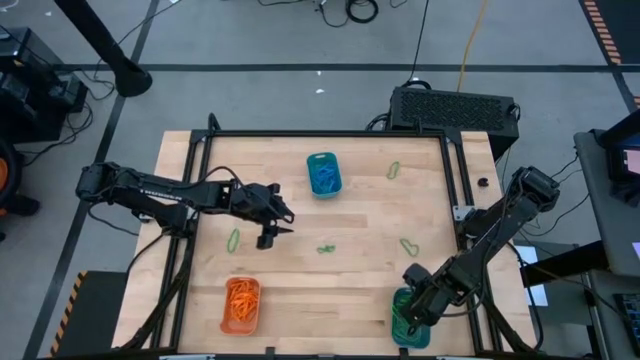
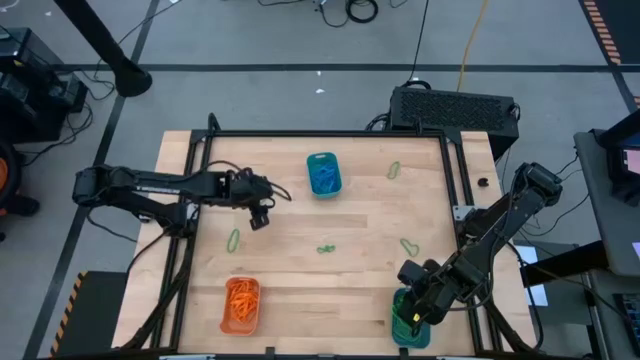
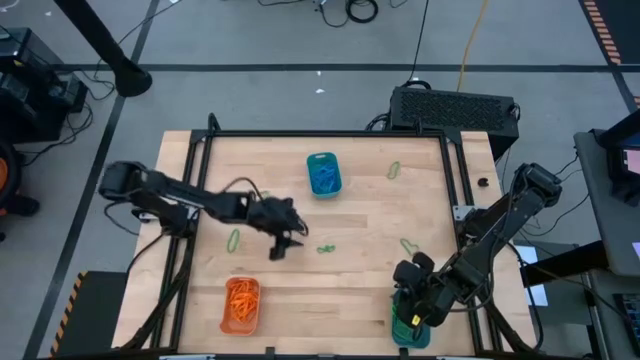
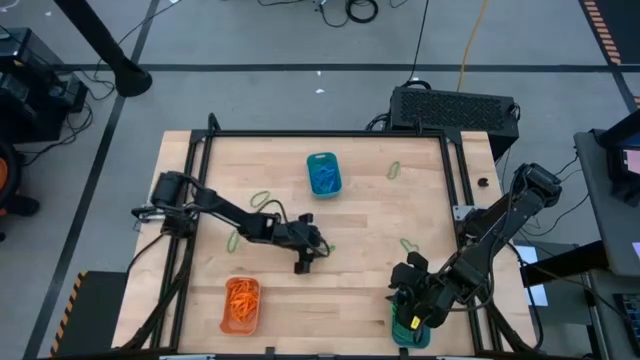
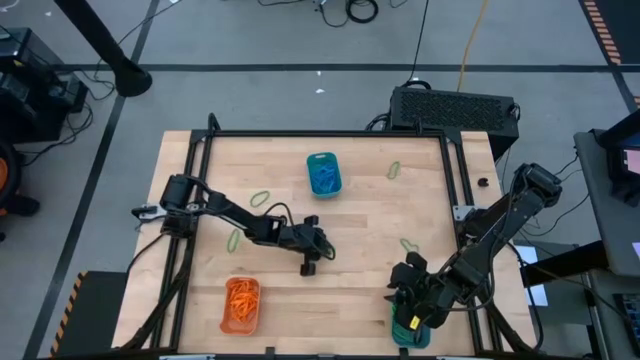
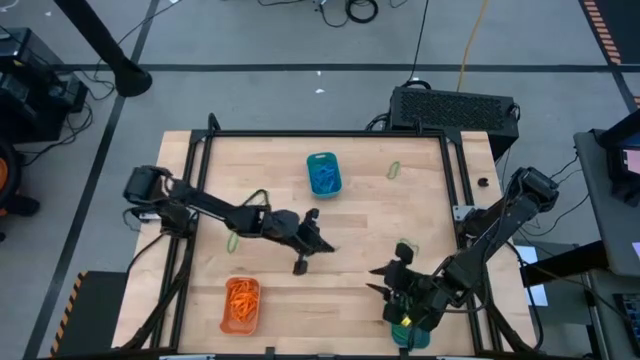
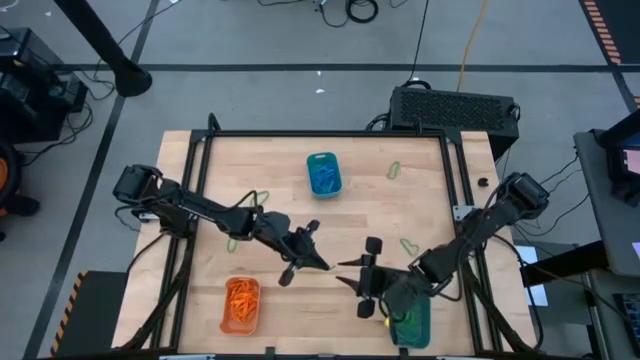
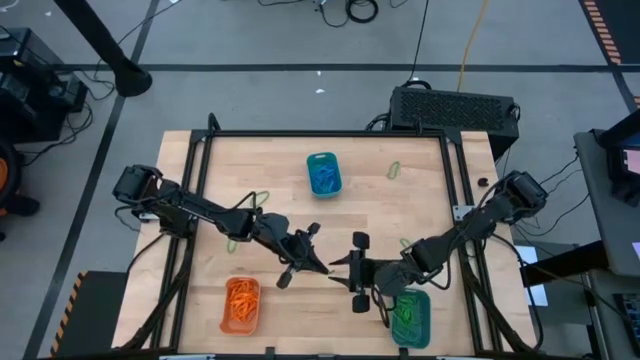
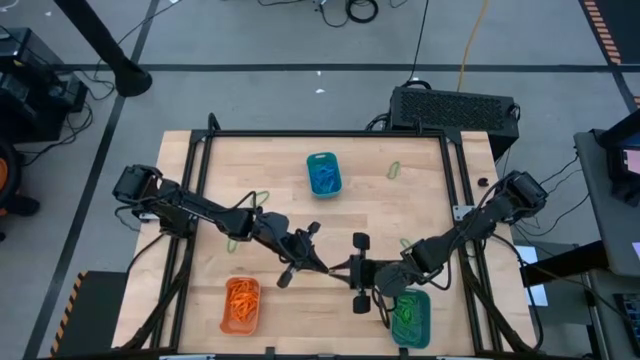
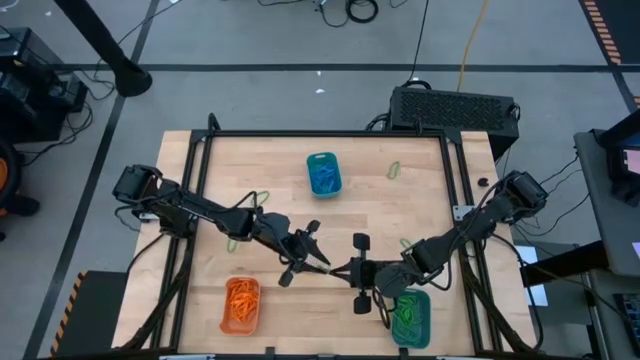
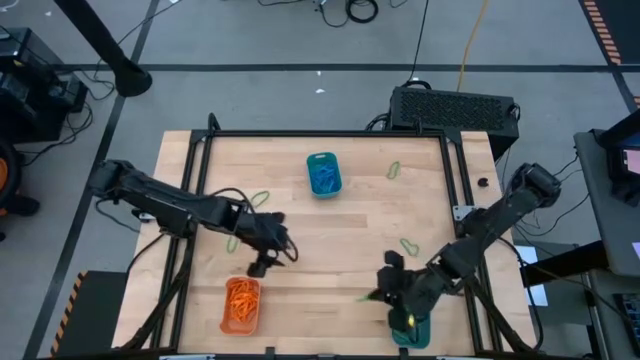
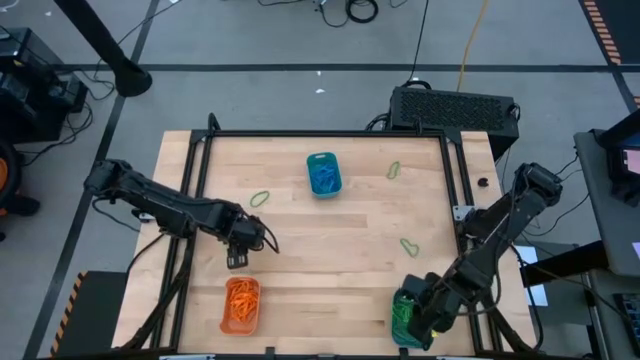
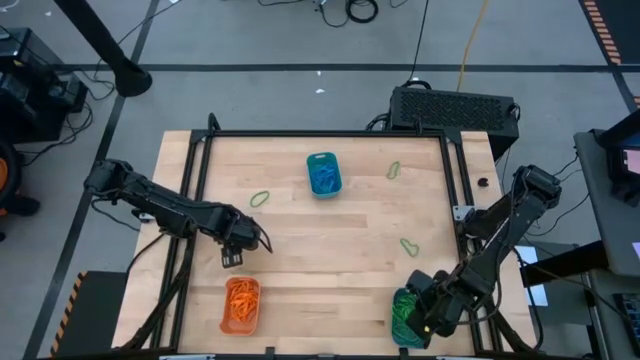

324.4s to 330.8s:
Task: Sort rubber bands into baskets
Put the green rubber band into the bottom bin

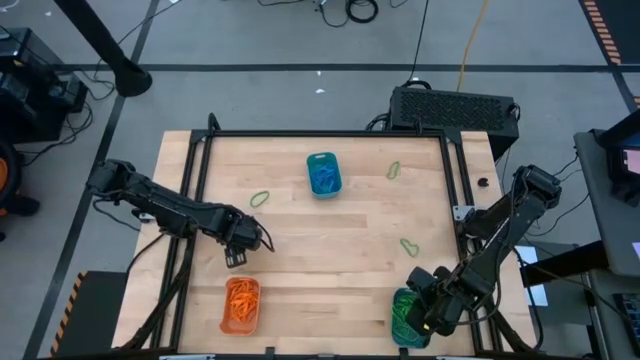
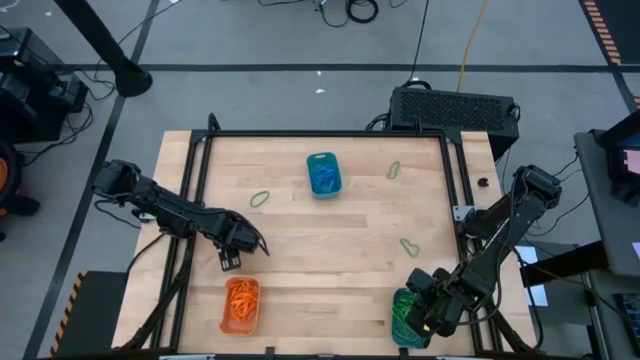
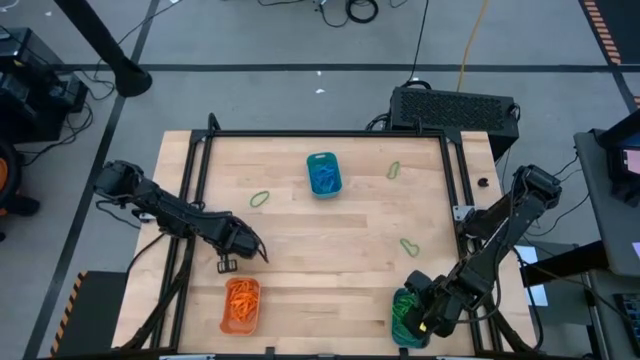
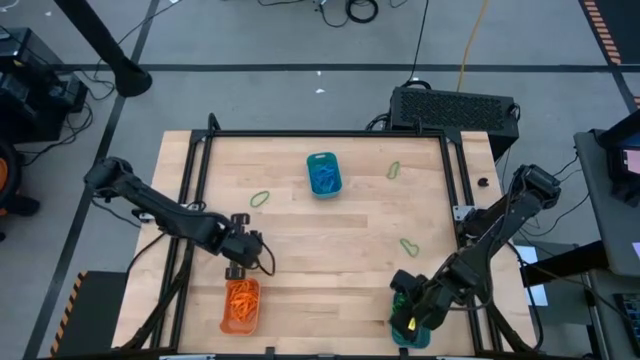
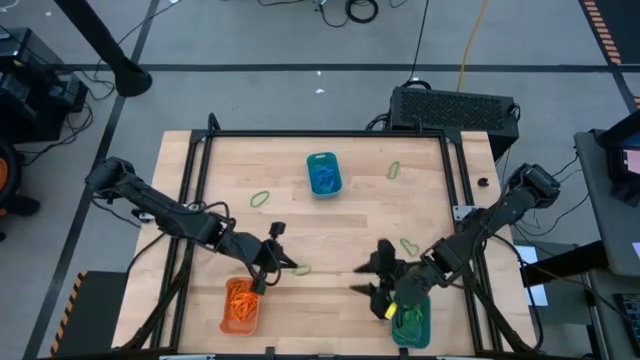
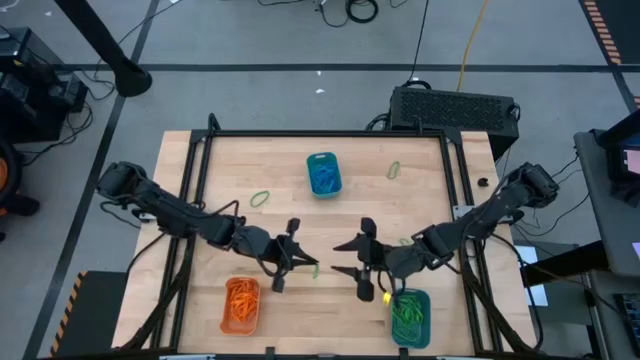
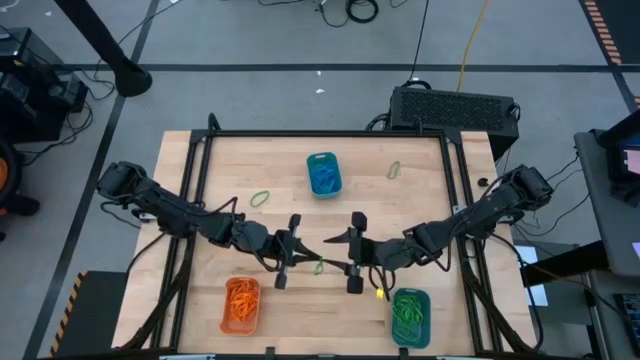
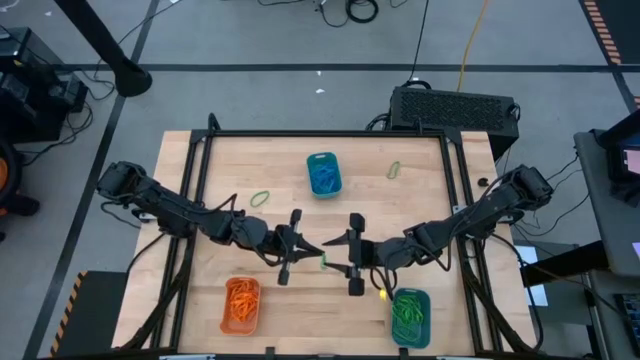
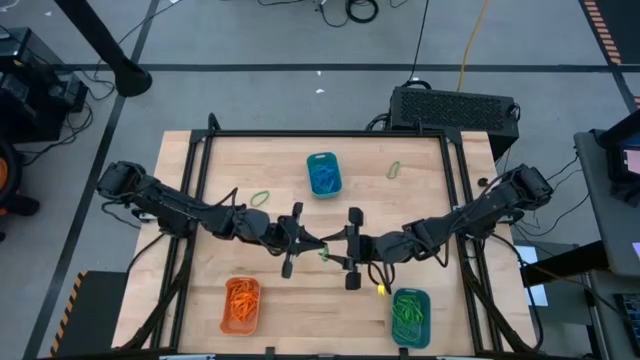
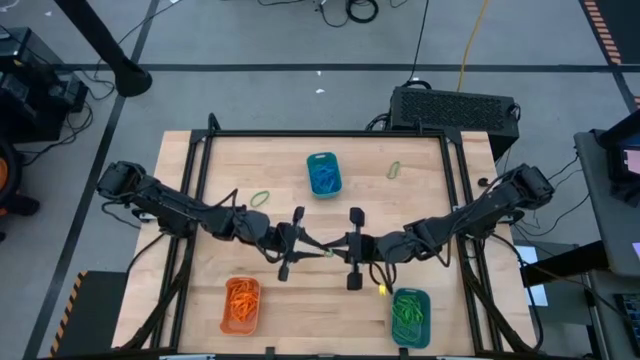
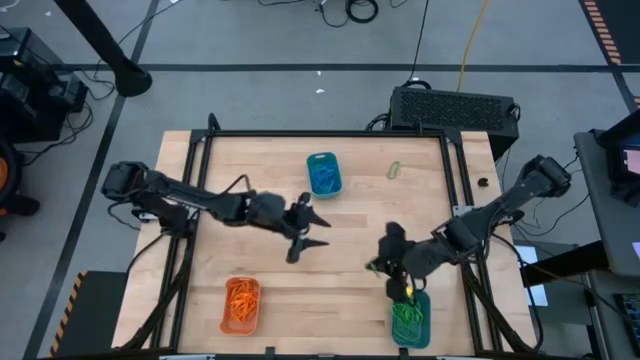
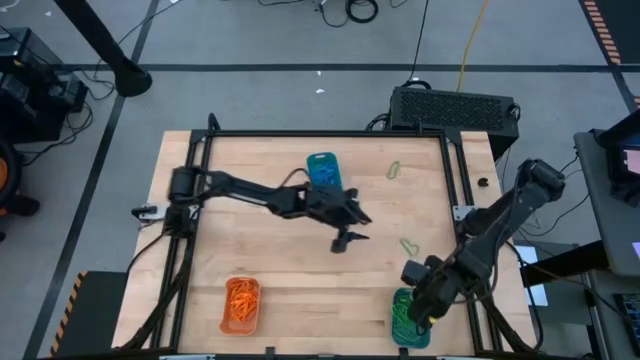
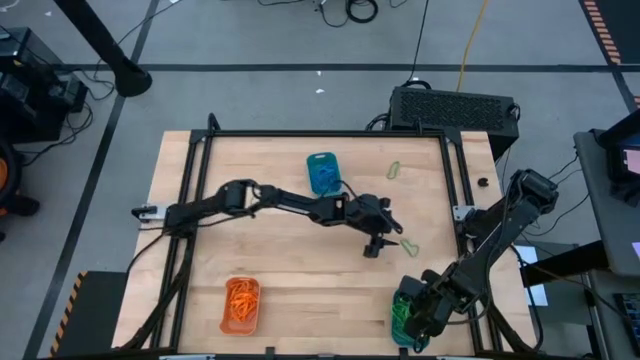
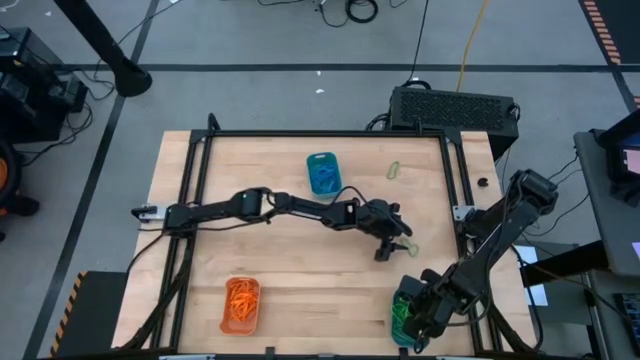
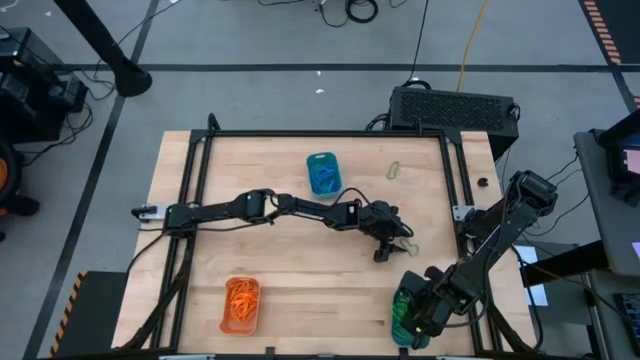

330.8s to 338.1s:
Put the green rubber band into the bottom bin

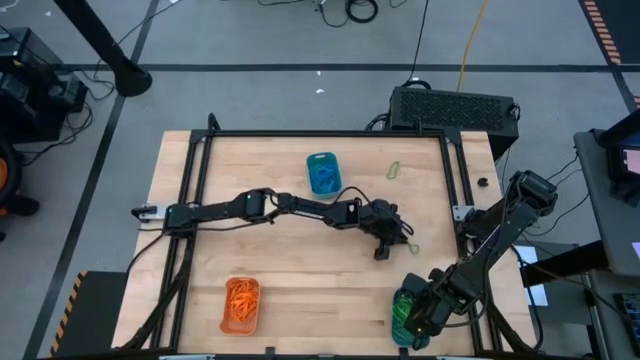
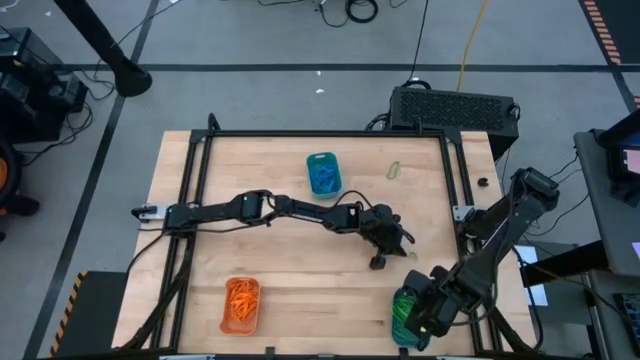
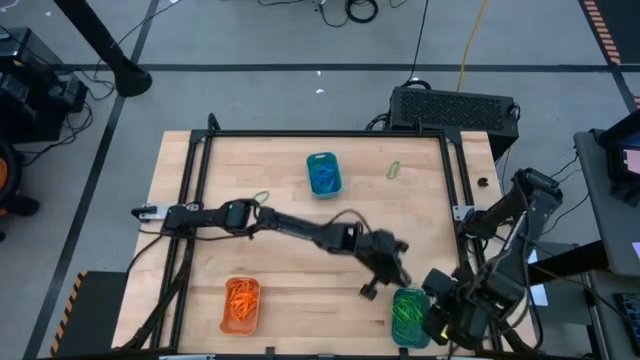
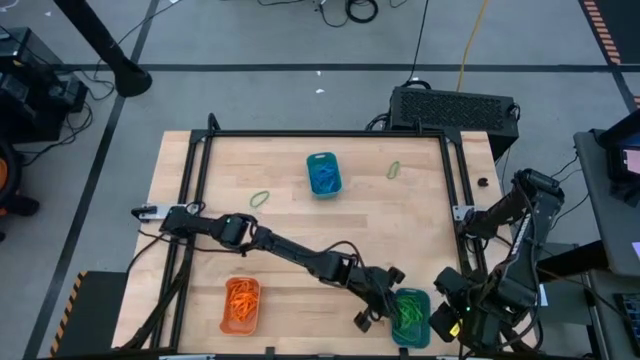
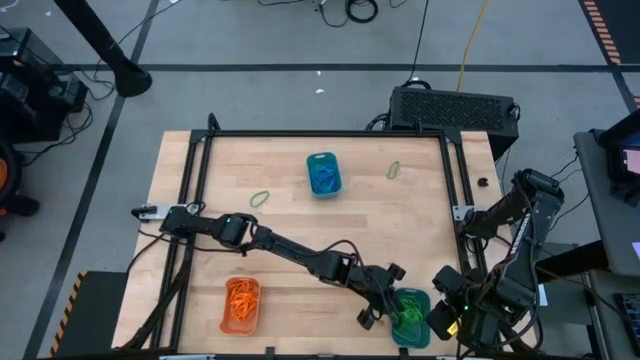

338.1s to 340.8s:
Put the green rubber band into the bottom bin

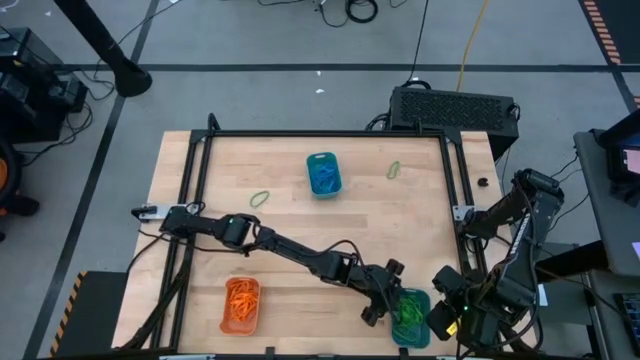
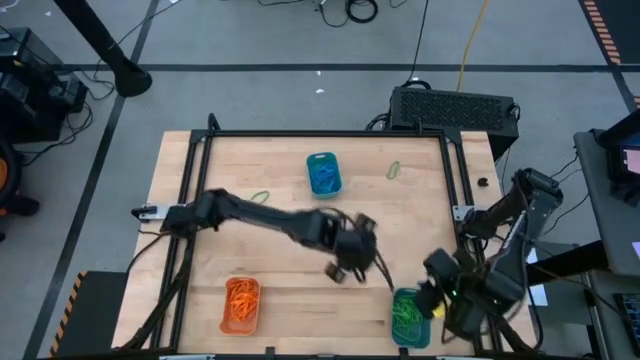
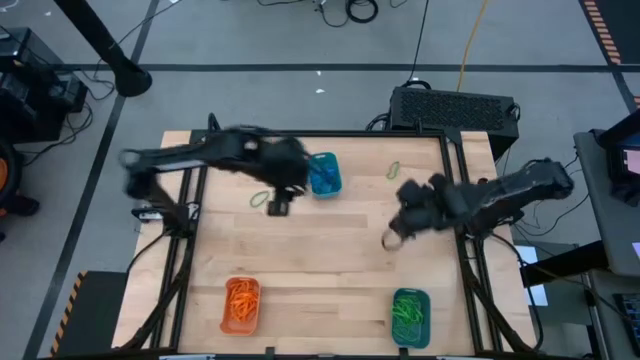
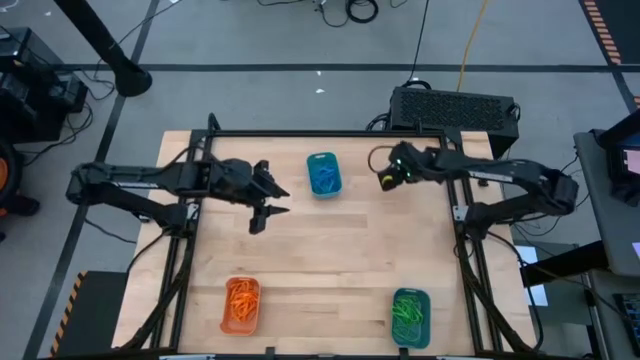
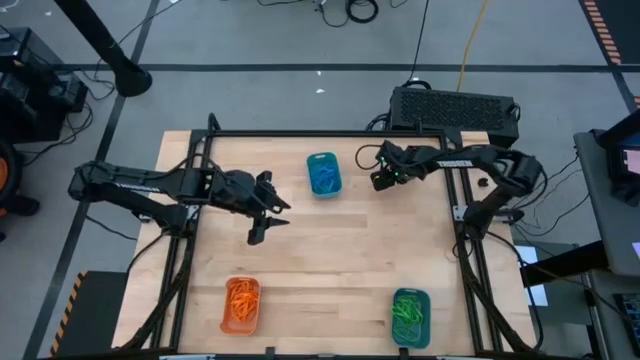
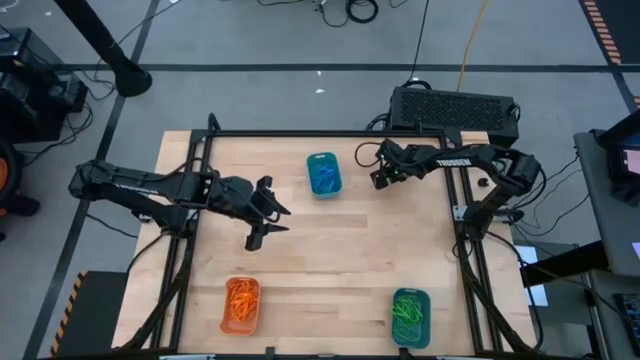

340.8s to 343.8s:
Put the green rubber band into the bottom bin
